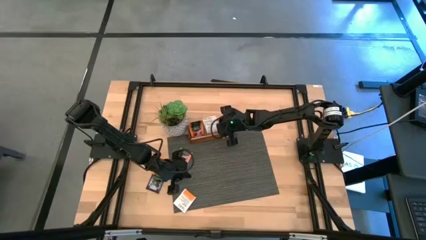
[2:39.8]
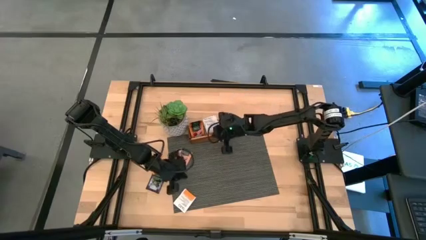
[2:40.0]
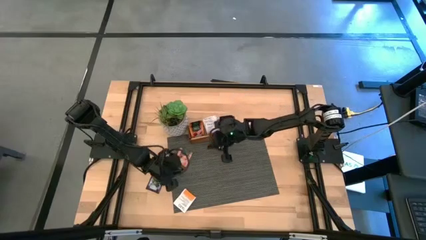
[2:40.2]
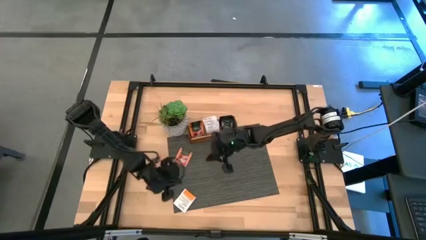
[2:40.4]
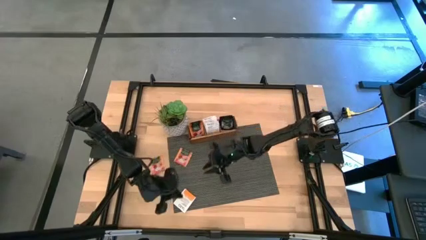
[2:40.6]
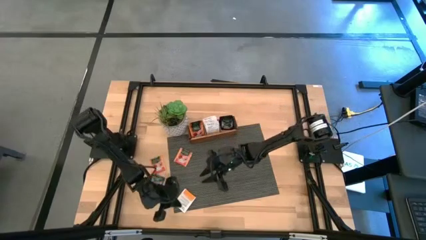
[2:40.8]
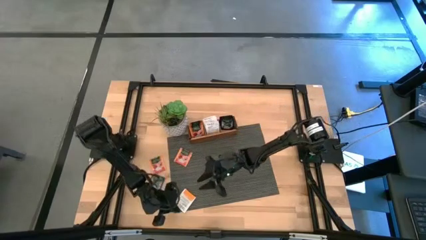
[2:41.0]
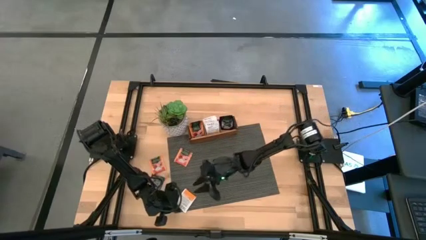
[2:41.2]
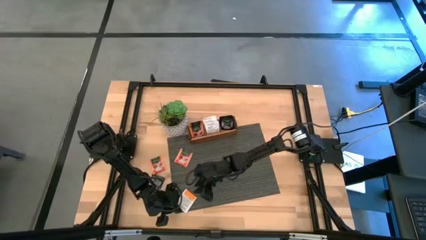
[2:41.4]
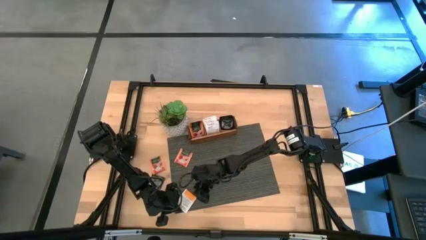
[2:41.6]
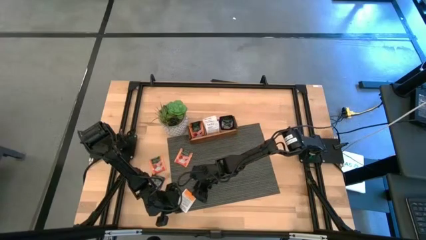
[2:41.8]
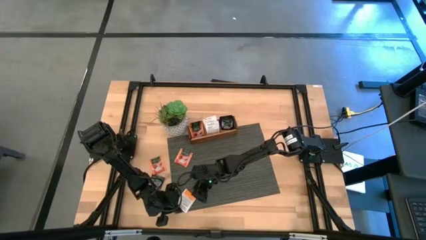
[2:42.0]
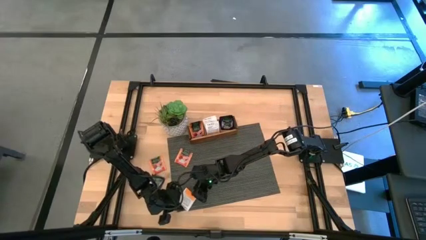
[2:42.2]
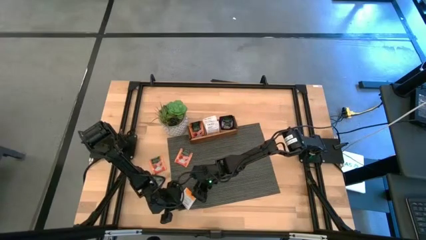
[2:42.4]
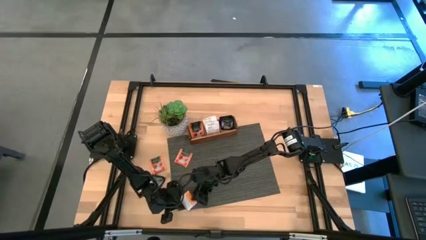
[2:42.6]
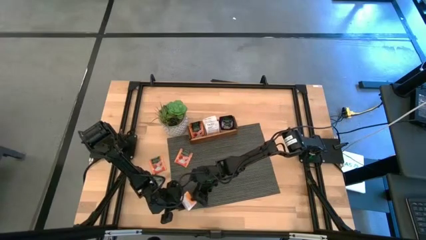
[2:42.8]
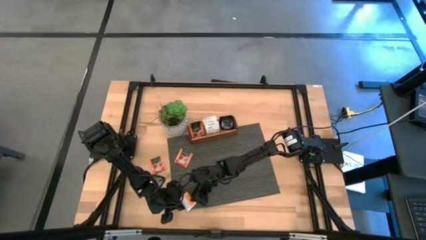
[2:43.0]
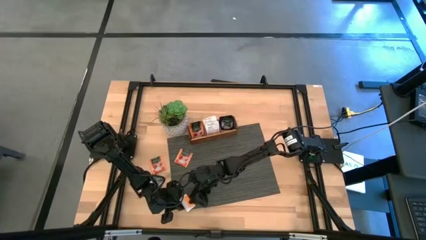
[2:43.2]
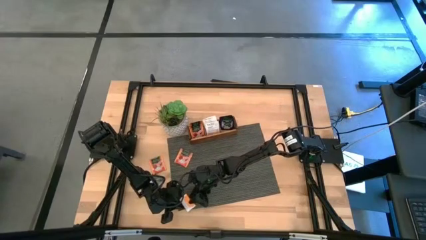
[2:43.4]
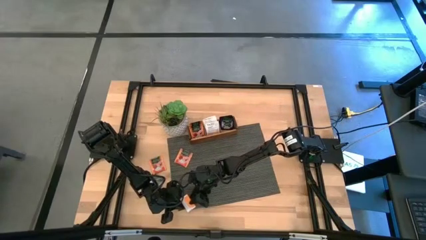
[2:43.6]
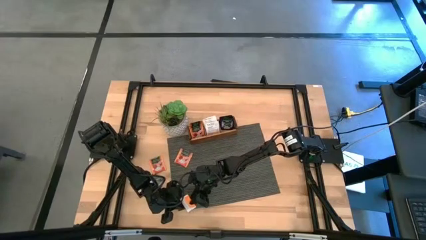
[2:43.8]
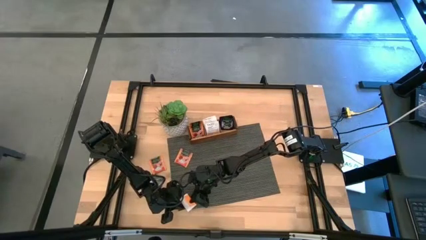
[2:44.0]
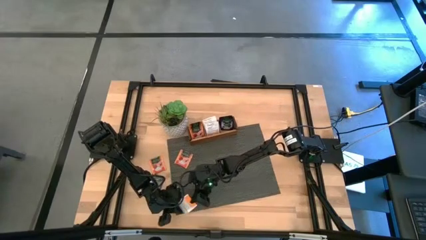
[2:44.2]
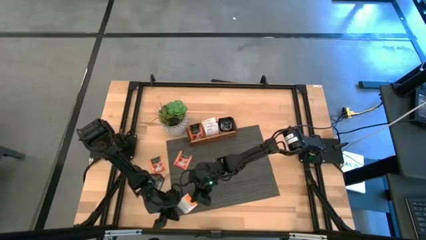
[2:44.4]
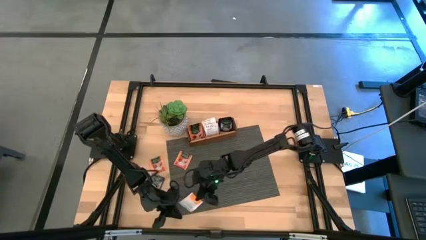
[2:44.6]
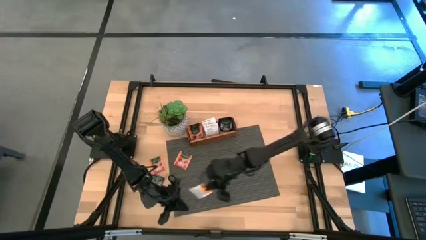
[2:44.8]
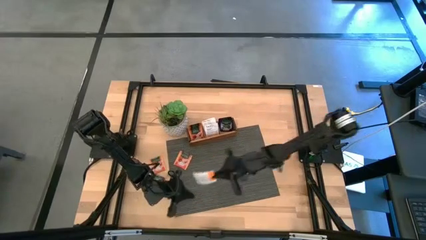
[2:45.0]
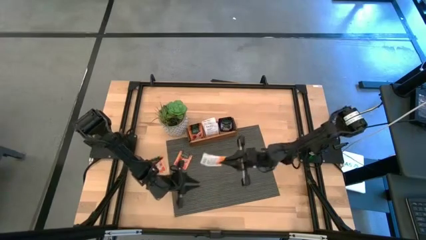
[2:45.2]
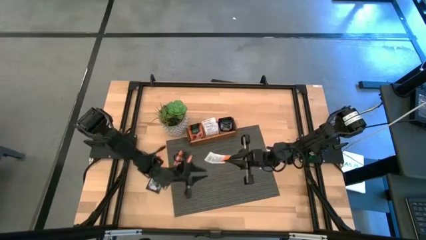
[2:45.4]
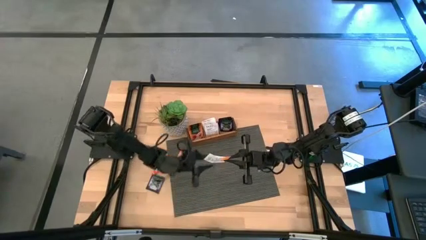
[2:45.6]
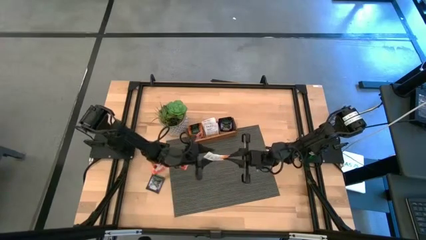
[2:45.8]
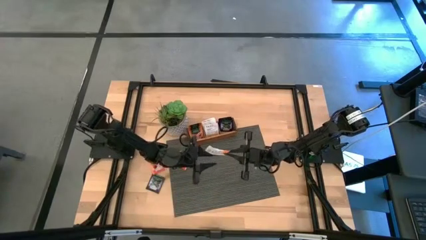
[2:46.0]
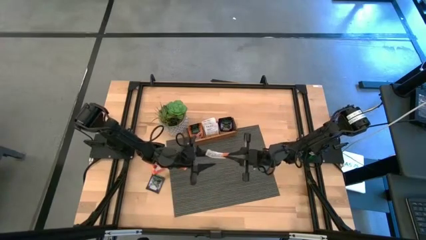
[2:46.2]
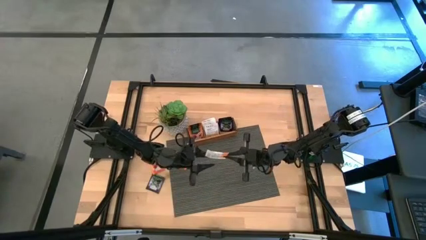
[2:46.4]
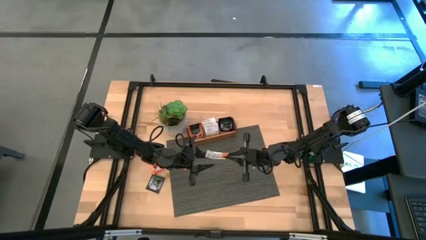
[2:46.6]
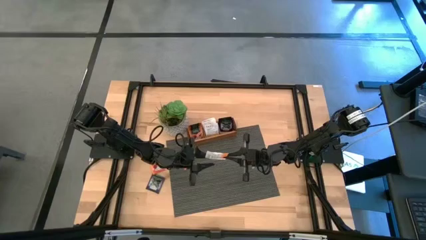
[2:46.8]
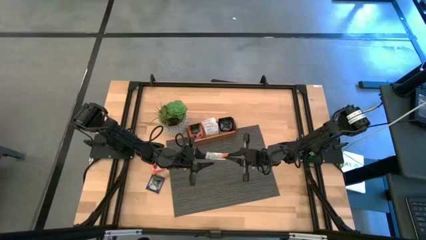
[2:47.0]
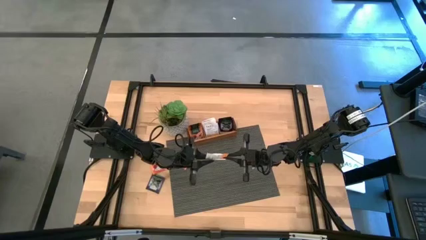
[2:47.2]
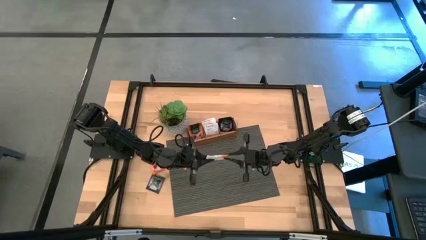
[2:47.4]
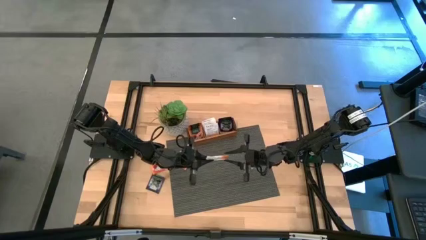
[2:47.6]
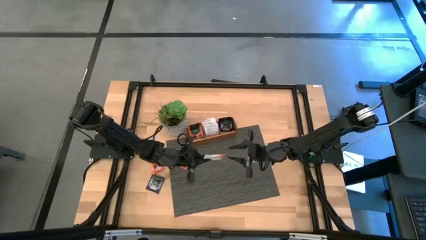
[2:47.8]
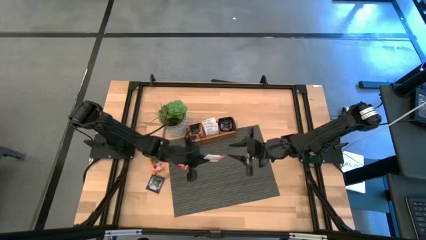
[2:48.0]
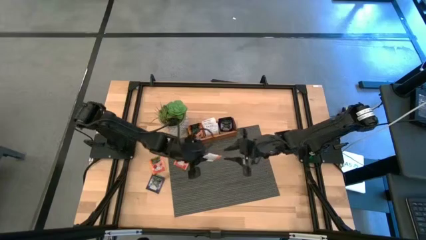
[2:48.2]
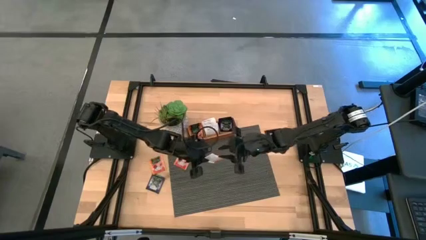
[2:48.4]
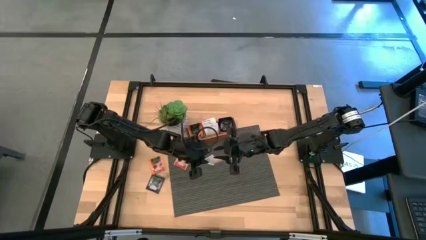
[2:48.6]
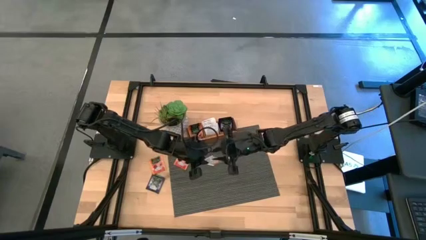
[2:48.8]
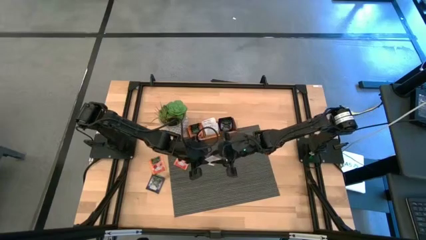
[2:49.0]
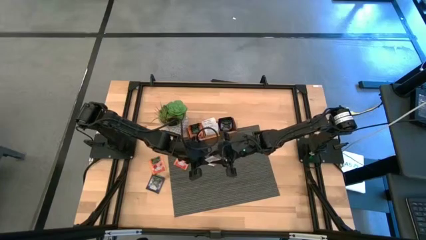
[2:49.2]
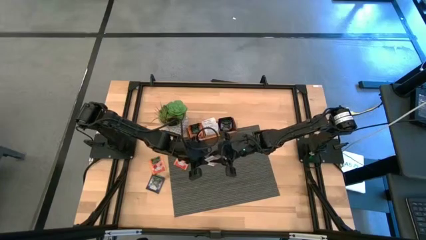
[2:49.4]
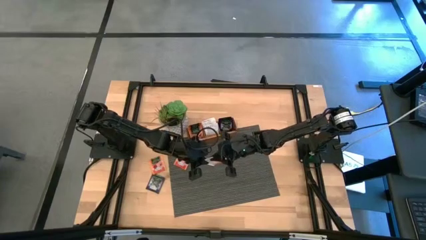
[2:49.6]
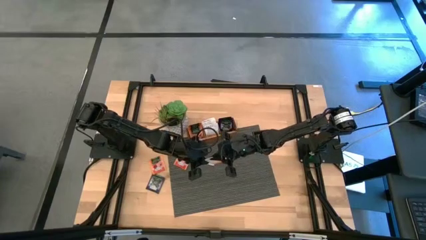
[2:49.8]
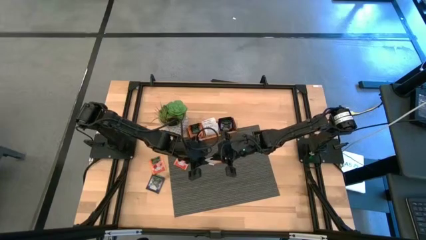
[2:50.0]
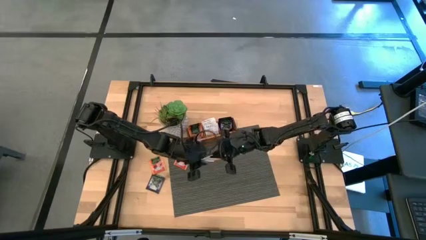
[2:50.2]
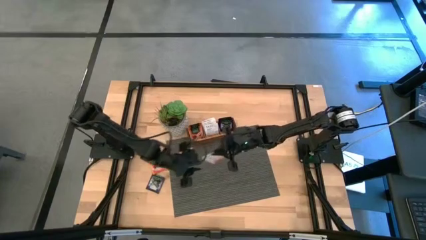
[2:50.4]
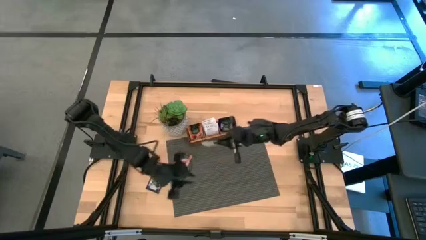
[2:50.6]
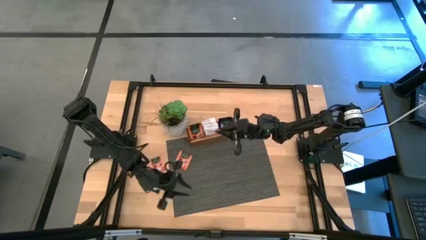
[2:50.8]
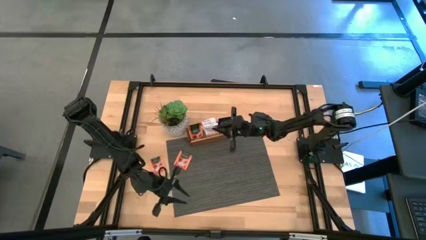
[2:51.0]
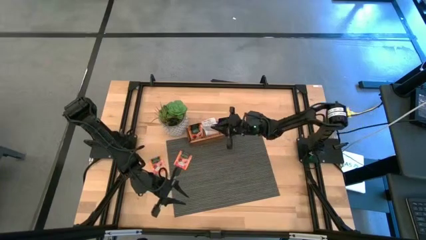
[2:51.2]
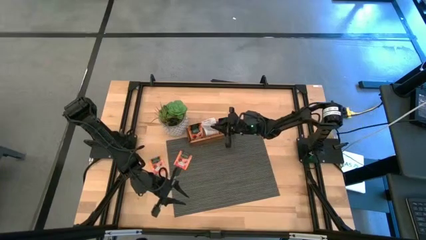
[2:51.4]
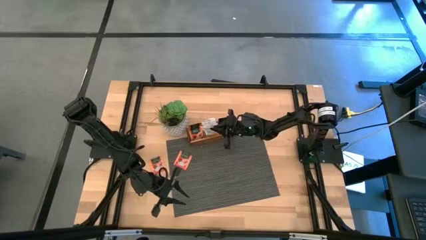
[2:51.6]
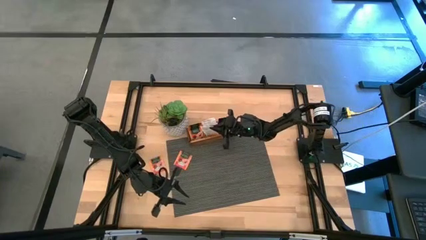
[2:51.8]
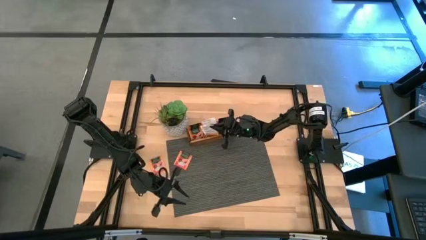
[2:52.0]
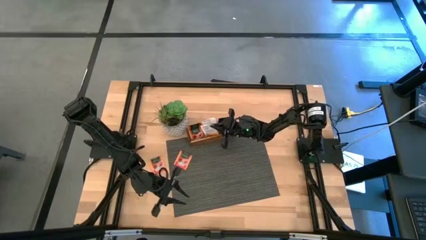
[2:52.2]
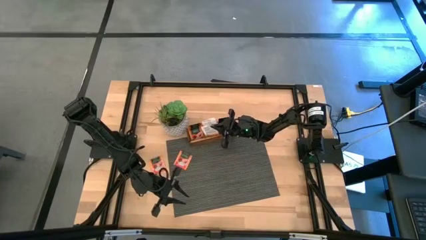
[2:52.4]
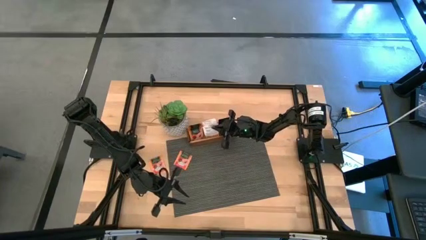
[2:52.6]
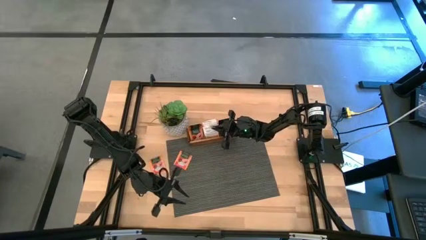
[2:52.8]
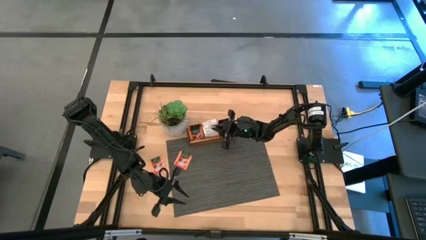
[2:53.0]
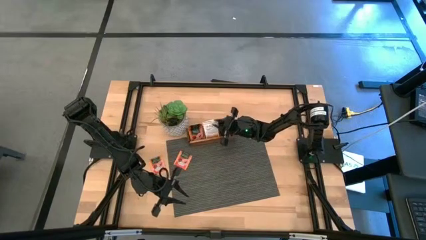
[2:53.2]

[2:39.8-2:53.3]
Task: Pick & Place Tea
Put the white tea bag into the middle slot of the wooden organizer

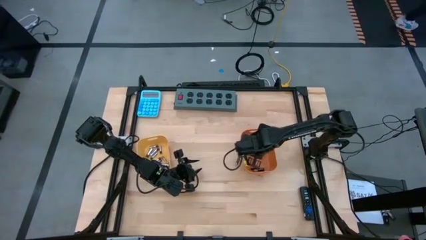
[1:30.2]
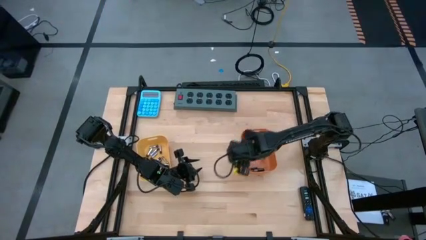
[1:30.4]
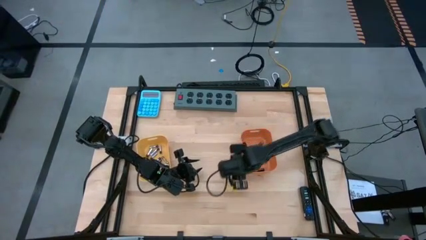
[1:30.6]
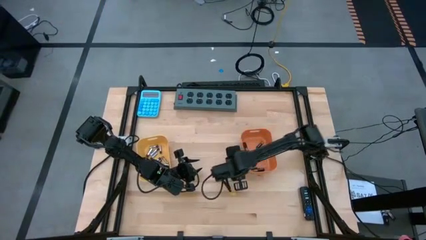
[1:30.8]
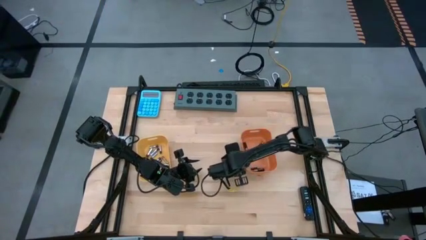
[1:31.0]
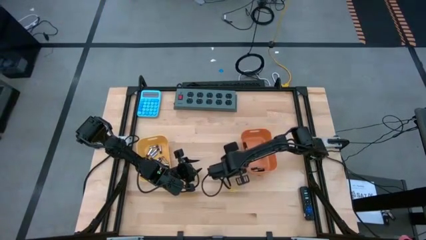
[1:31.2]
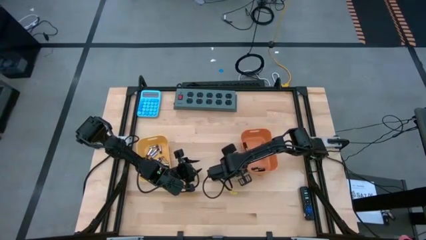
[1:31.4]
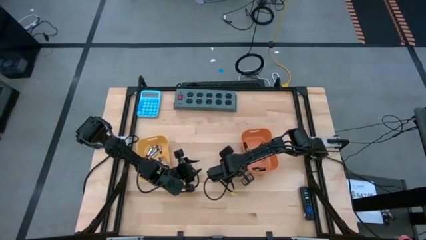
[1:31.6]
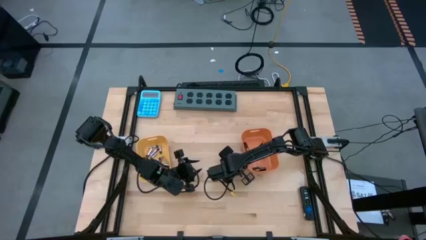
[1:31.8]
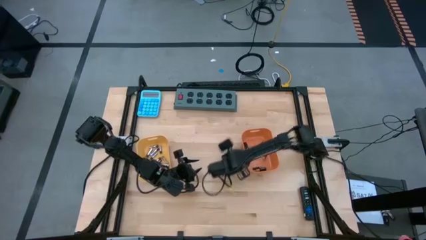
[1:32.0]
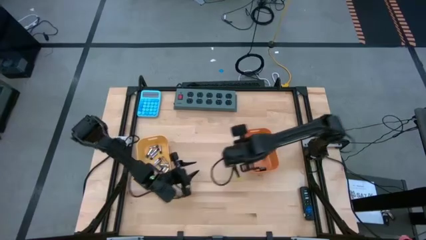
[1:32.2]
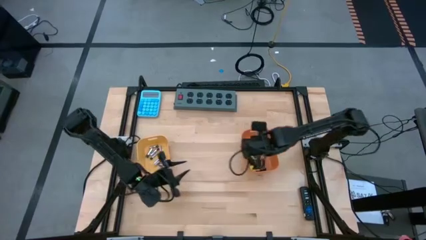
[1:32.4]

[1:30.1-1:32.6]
Task: Sort batteries
Put the black battery into the orange bin
